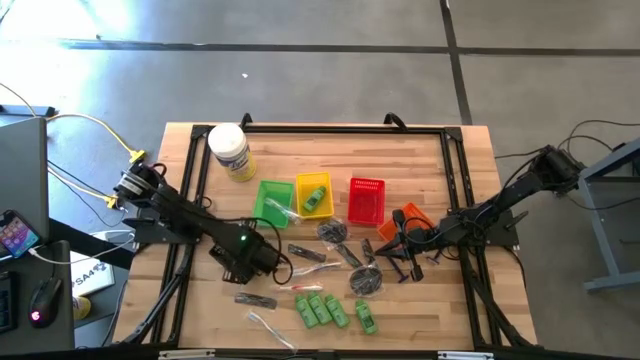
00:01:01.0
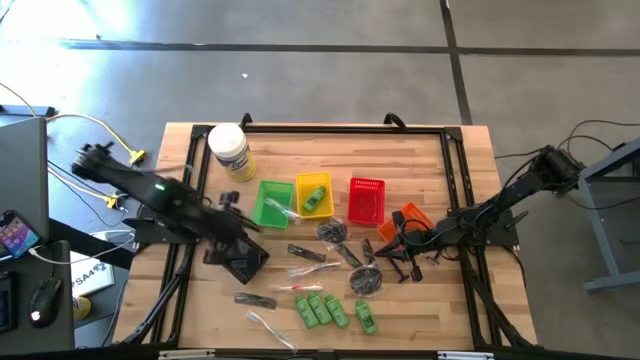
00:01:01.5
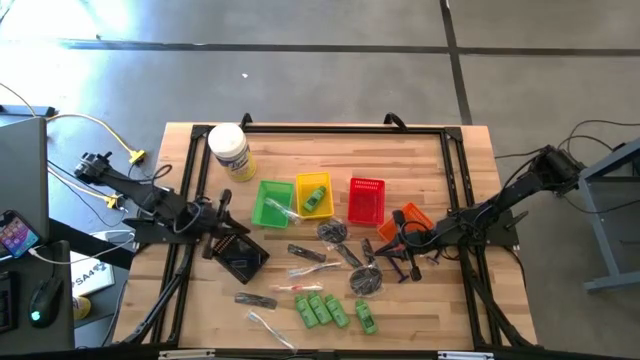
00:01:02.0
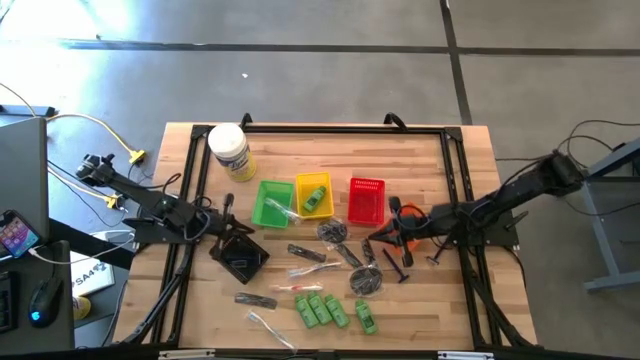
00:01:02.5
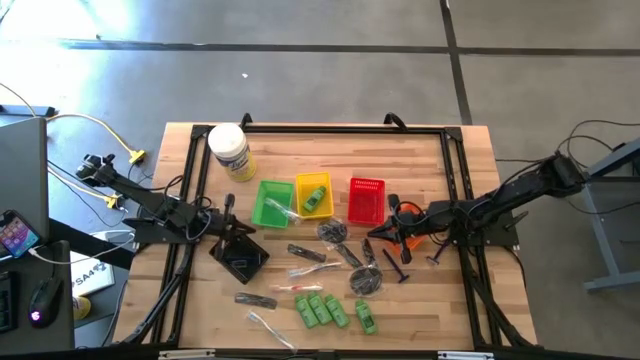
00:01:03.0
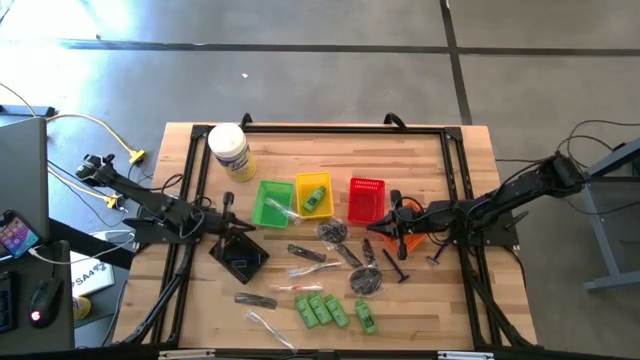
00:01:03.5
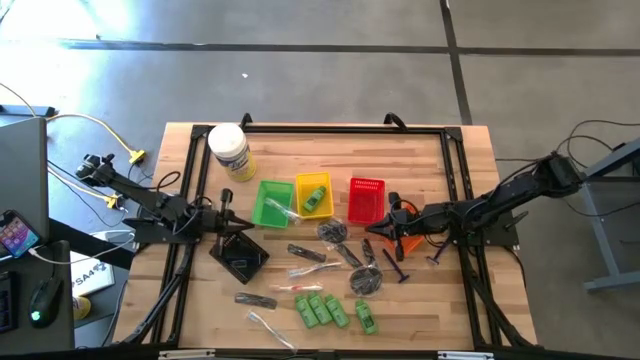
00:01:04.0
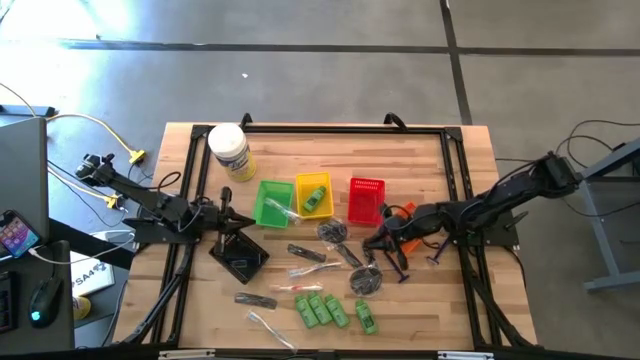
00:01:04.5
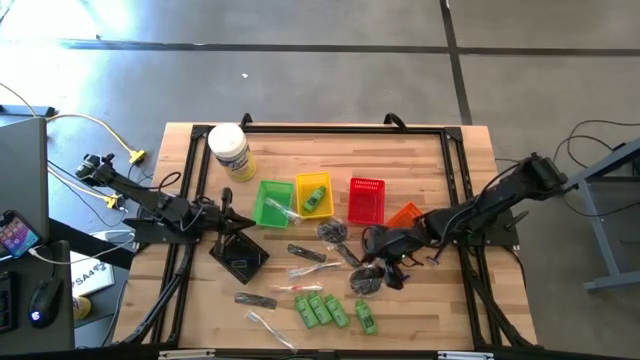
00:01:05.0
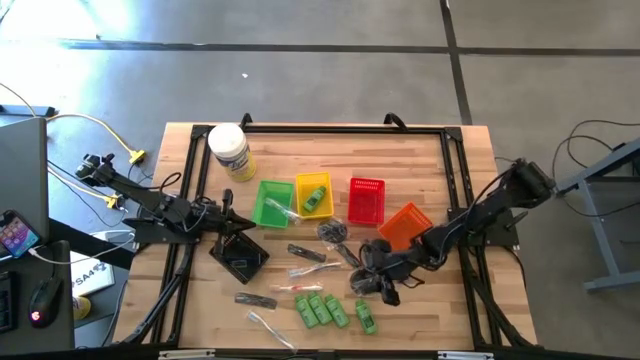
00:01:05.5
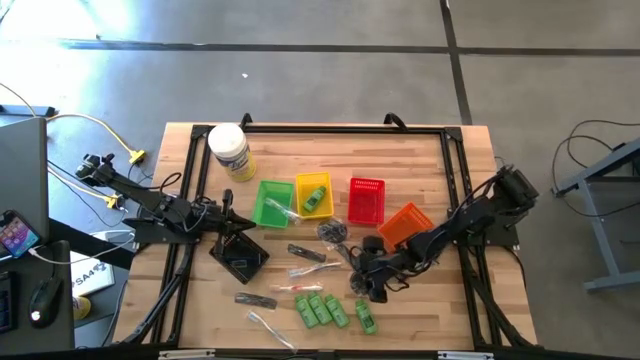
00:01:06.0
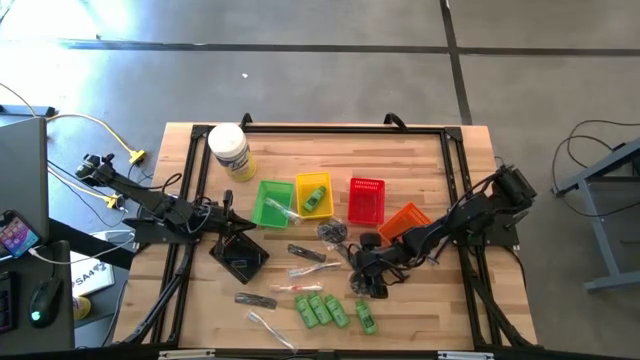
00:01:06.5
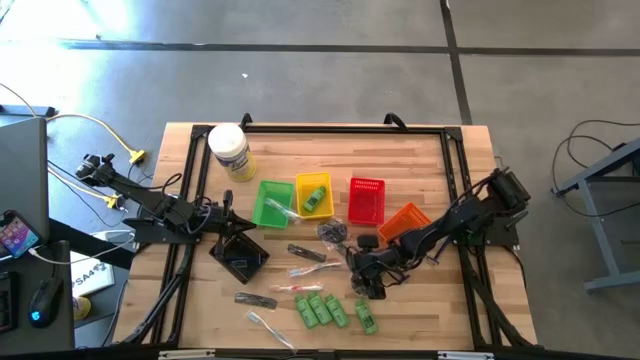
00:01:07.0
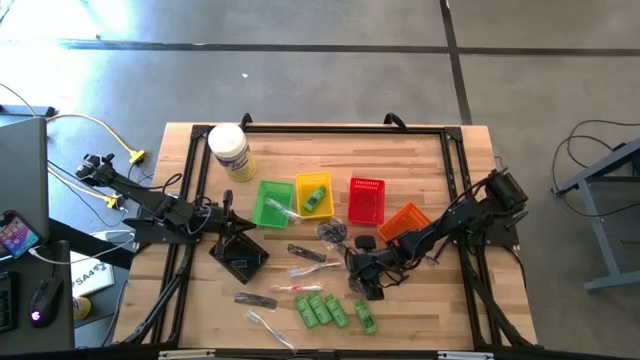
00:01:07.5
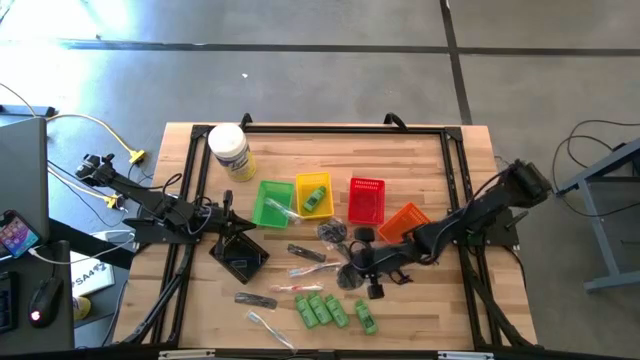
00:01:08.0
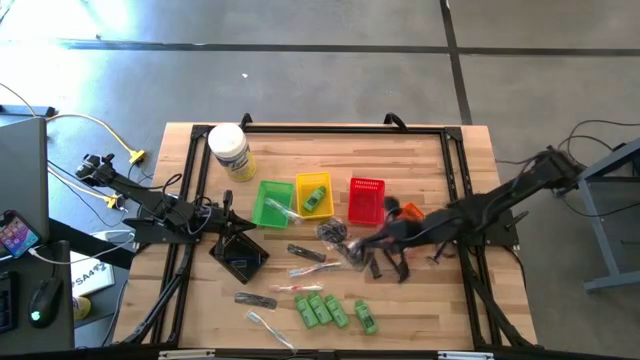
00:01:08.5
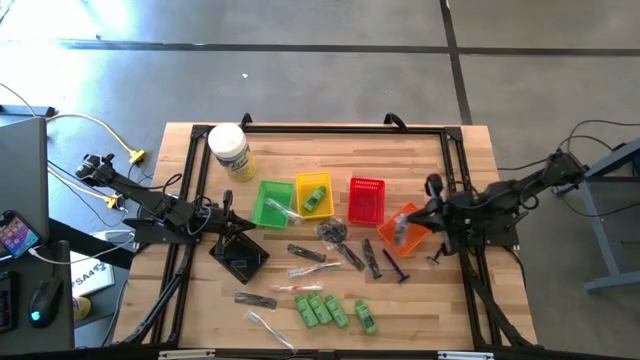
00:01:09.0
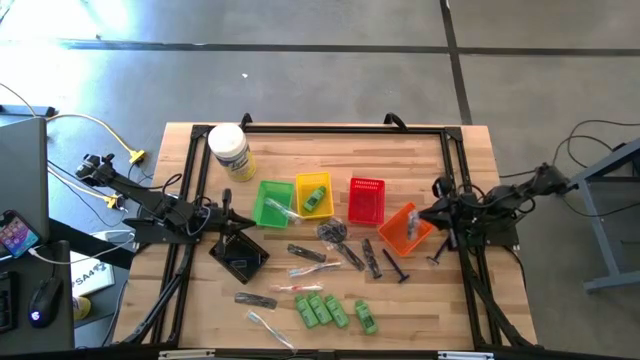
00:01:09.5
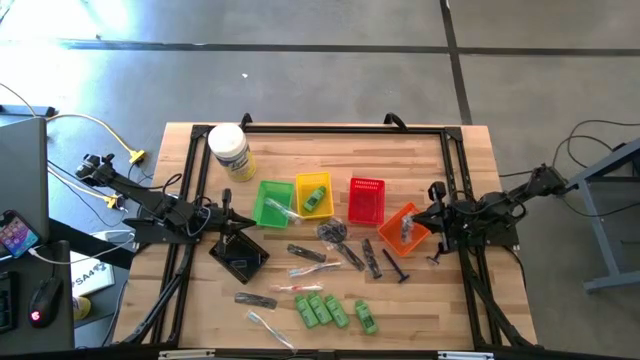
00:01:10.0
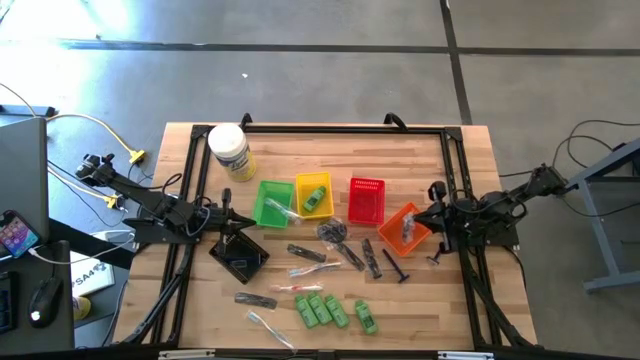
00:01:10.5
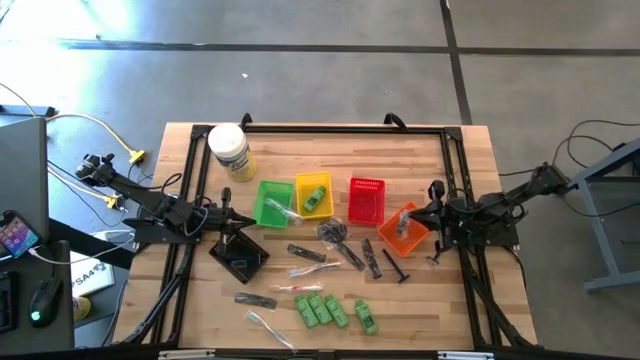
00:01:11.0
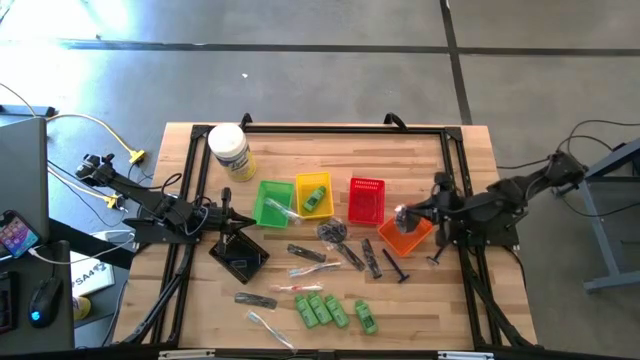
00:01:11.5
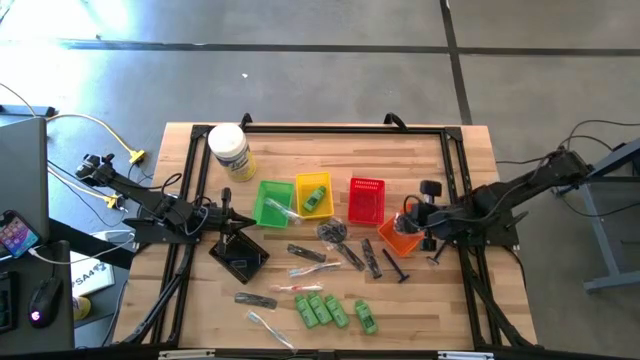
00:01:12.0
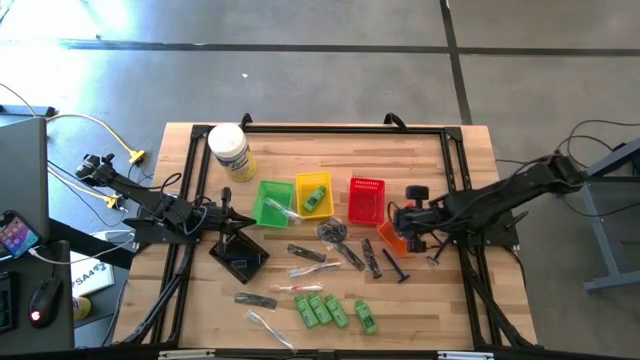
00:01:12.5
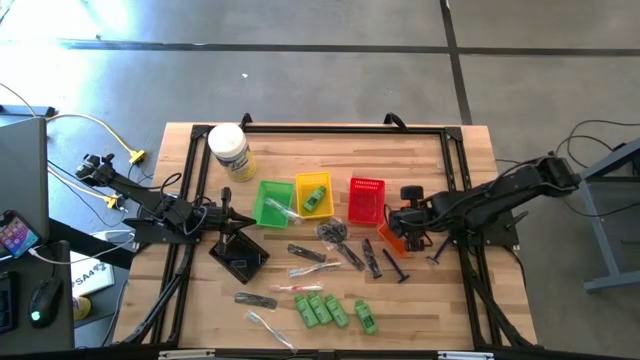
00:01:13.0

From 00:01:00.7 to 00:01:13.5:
Task: Pick & Place Travel size toiletries
Put the bottom black hairbrush into the orange basket

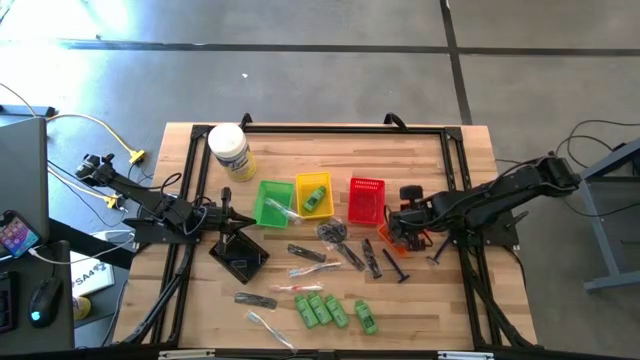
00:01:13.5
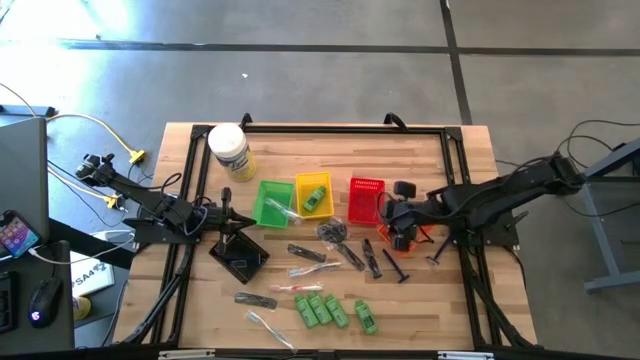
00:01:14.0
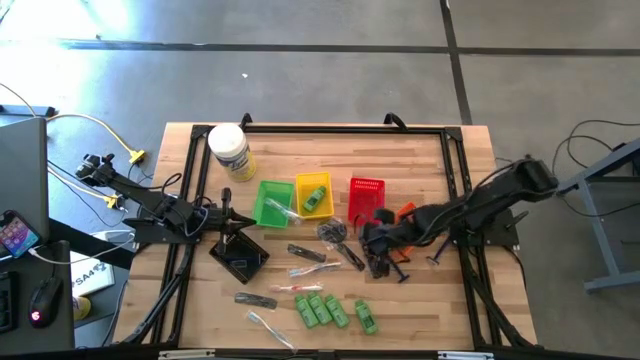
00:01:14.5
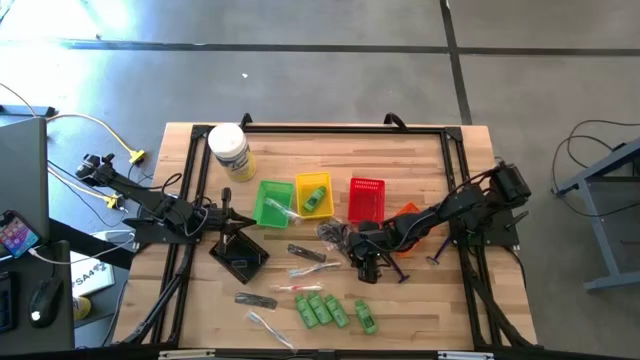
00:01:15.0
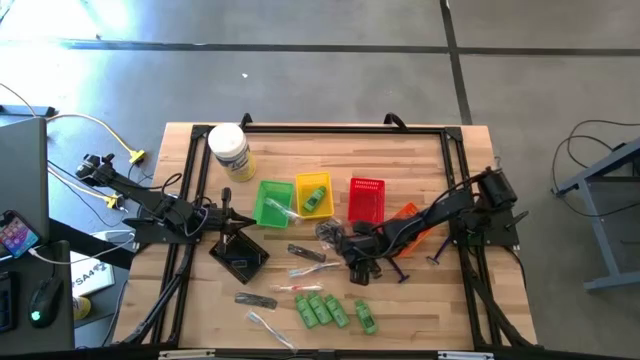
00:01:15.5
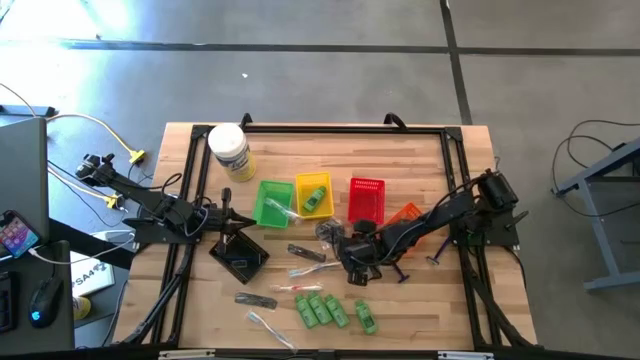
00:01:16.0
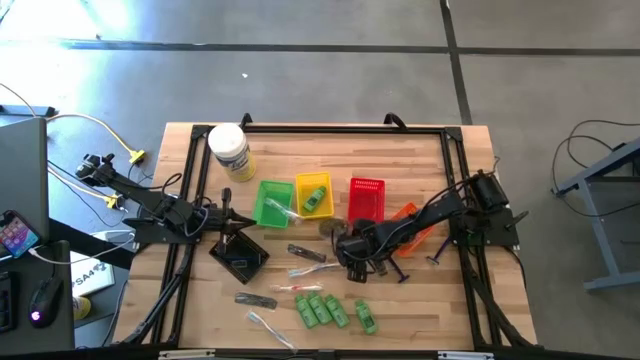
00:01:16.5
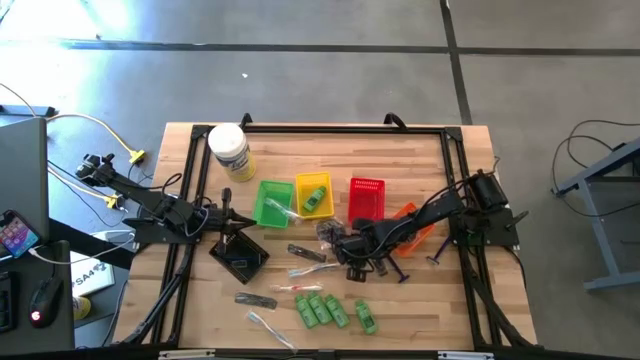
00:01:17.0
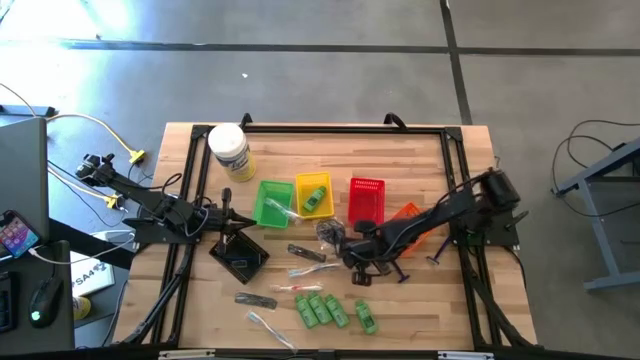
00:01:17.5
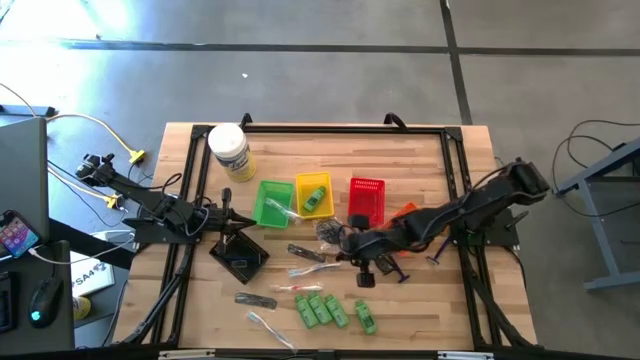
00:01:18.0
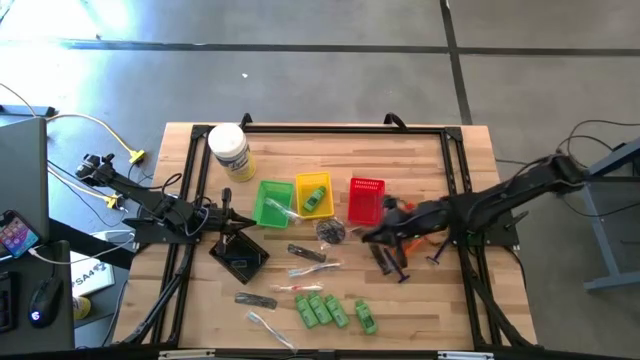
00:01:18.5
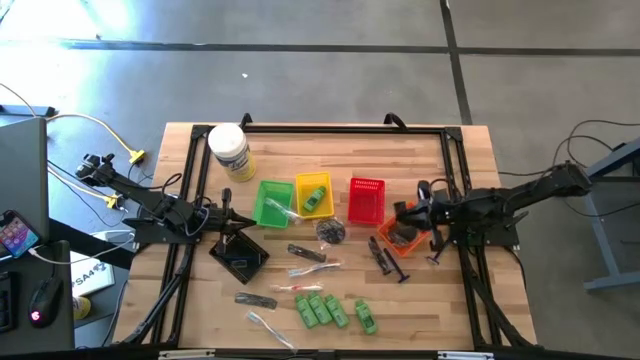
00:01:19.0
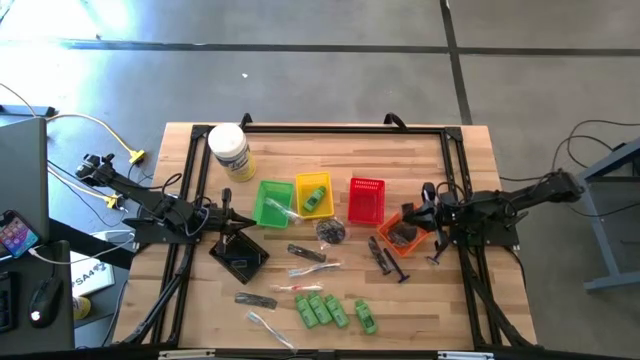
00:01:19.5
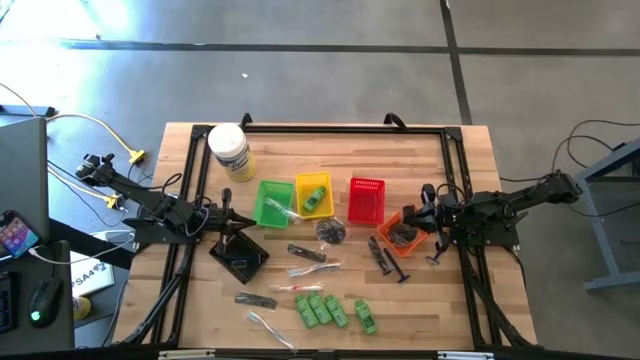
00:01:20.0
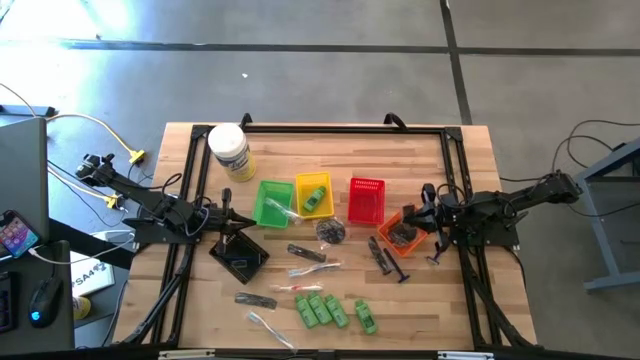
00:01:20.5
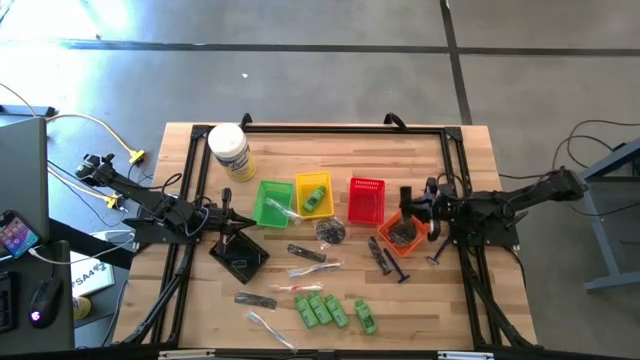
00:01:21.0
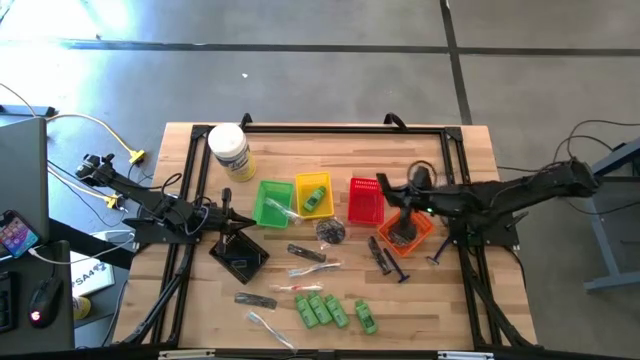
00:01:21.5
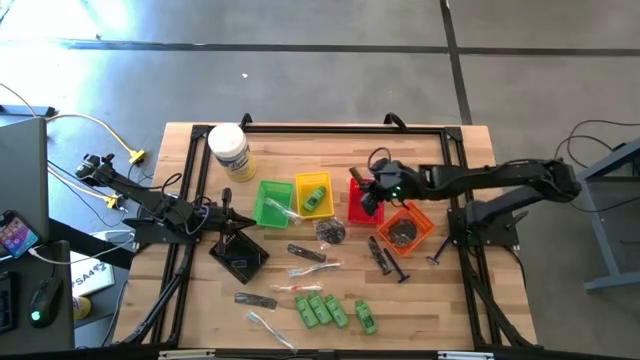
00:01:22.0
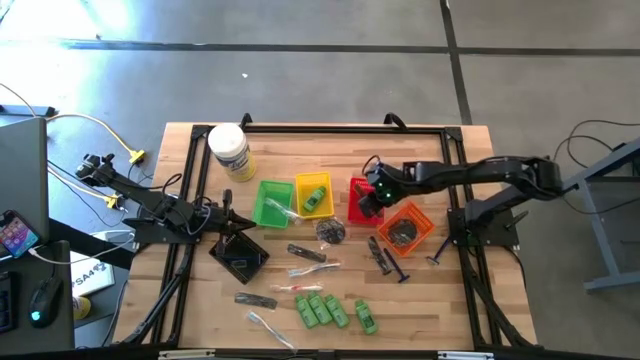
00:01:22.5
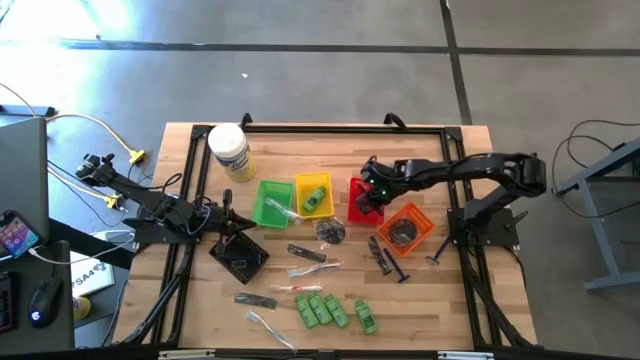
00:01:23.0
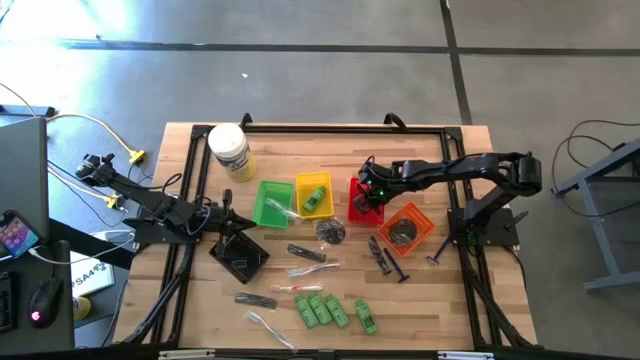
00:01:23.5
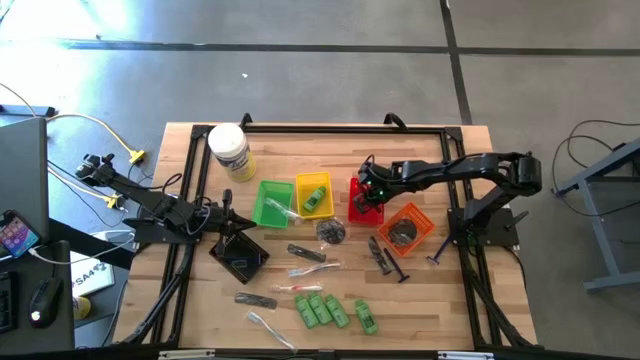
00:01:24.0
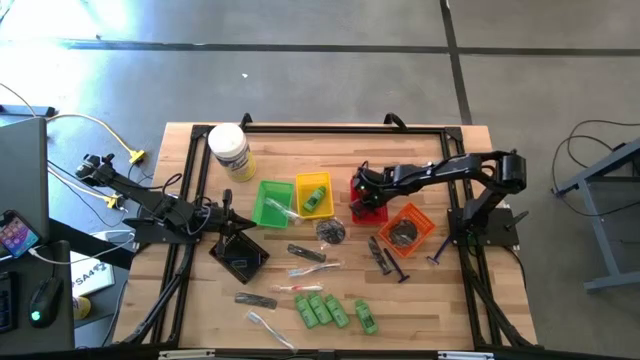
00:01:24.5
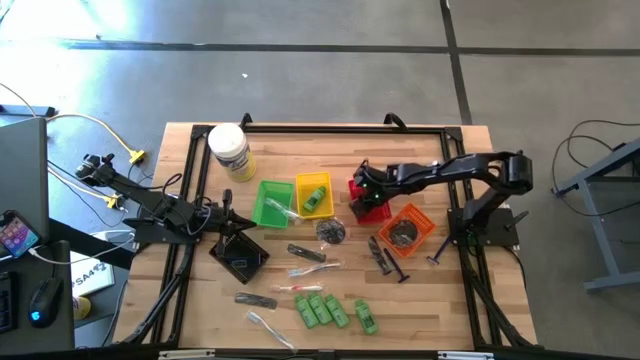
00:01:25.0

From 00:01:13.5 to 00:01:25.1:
Put the black comb into the red basket
